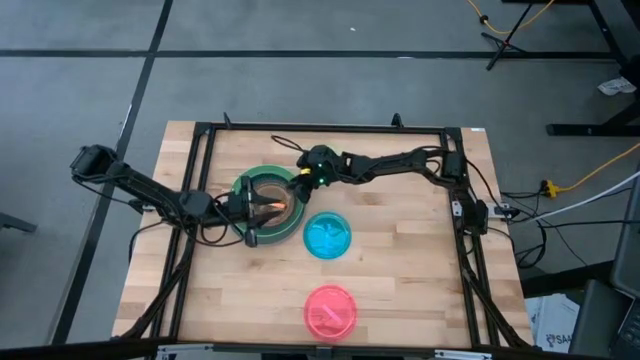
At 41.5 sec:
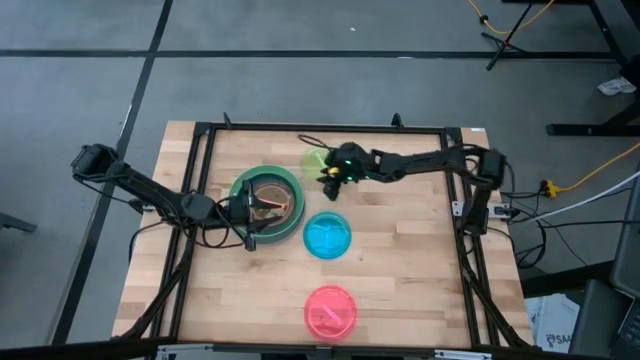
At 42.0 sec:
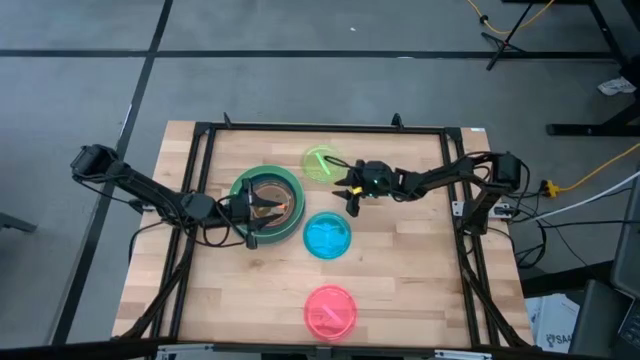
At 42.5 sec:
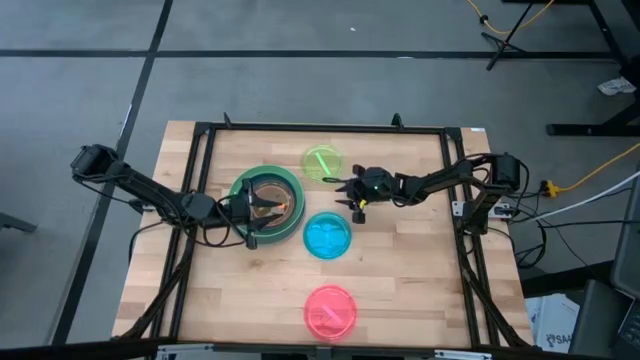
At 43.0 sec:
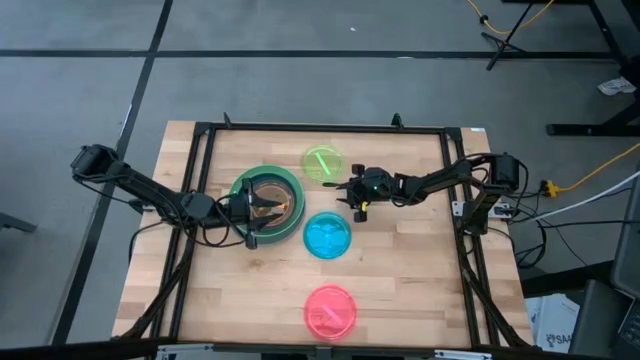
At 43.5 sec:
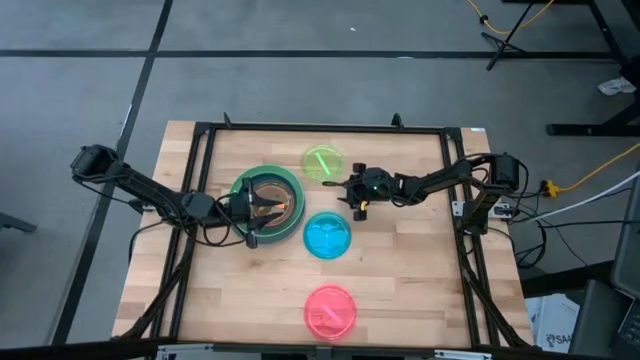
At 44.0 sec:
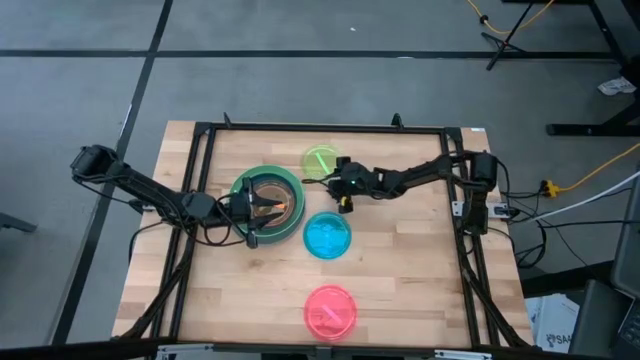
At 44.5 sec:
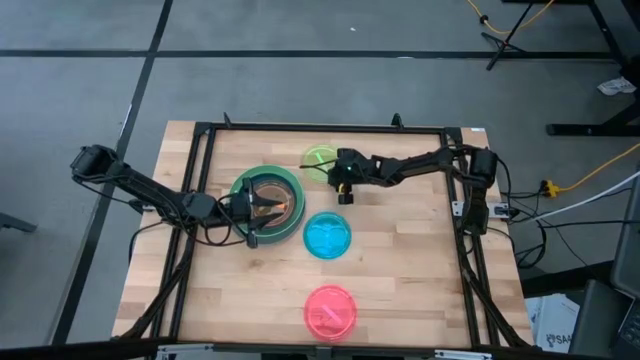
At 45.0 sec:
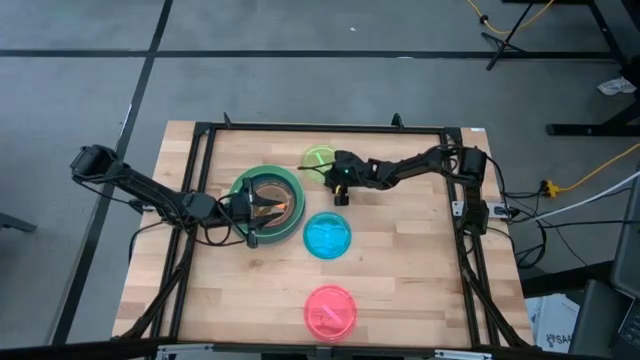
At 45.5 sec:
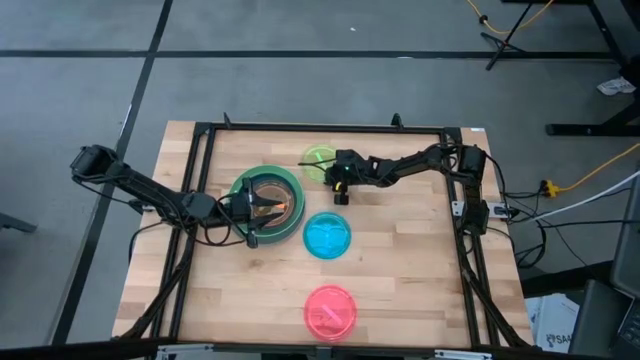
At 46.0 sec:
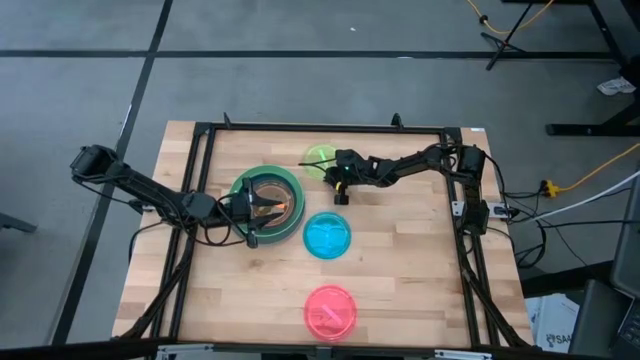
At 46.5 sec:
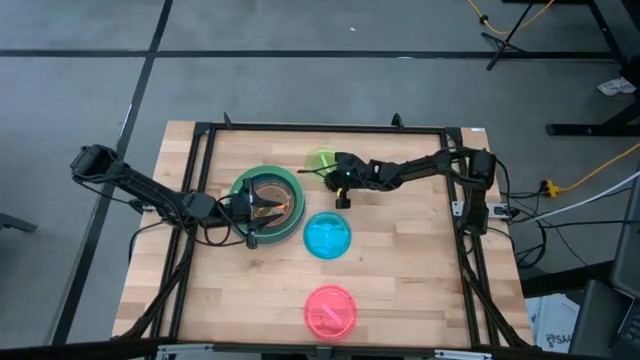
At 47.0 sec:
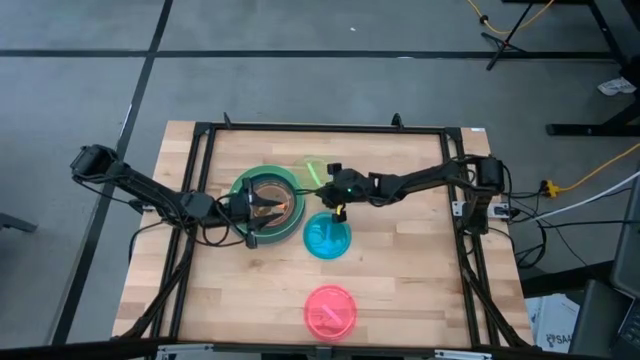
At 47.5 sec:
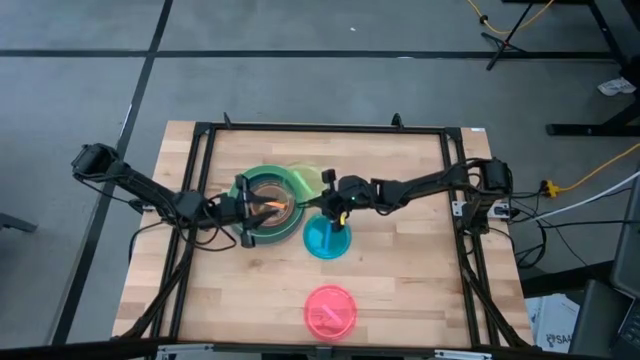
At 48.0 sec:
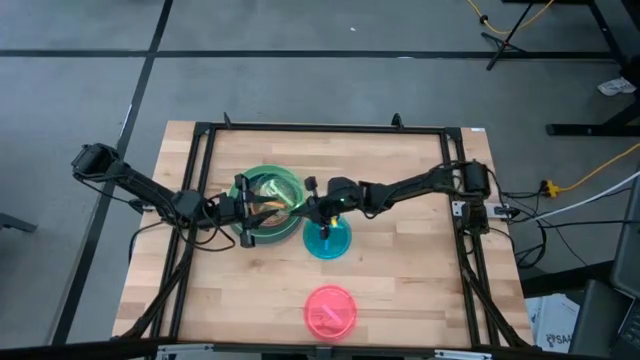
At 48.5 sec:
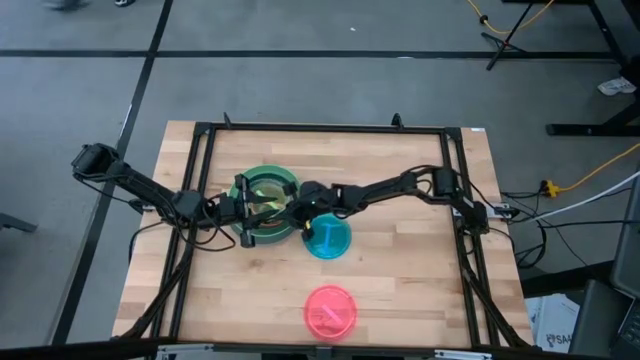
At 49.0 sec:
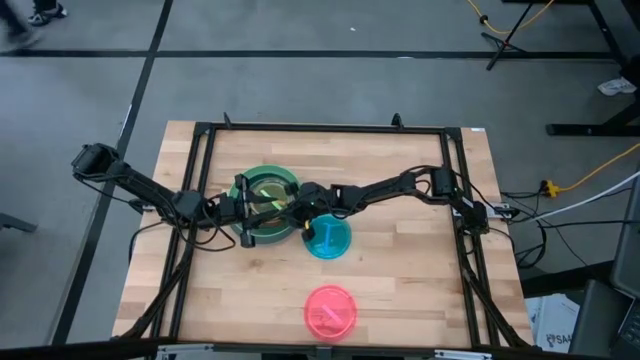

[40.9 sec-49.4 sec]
Task: Stack plastic plates
Stack the light green plate on top of orange plate

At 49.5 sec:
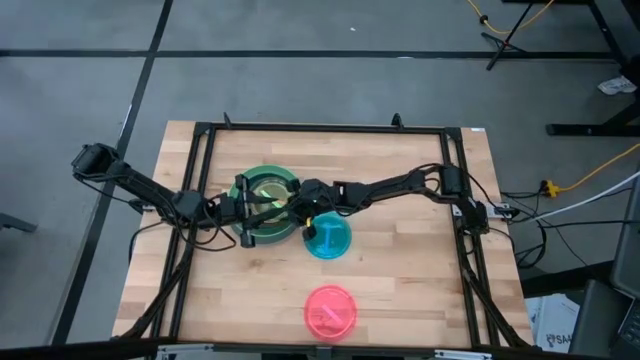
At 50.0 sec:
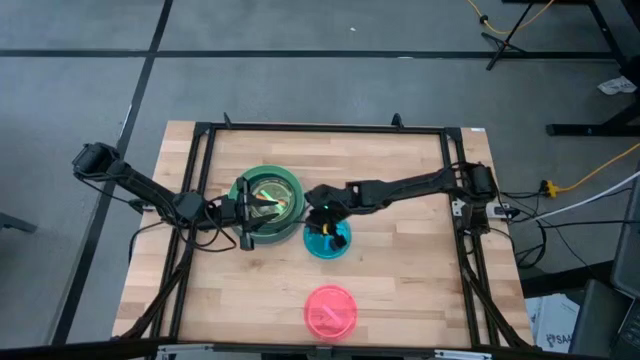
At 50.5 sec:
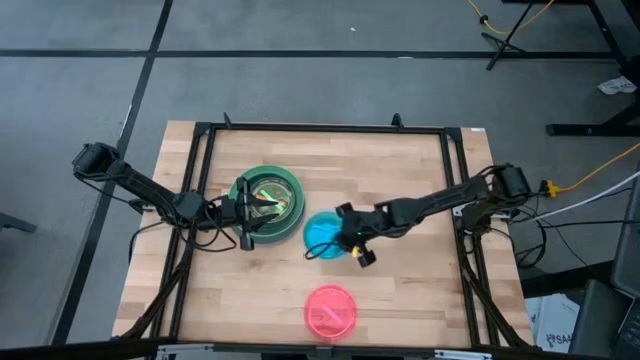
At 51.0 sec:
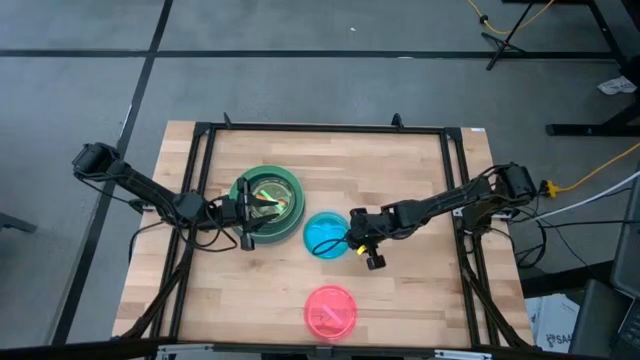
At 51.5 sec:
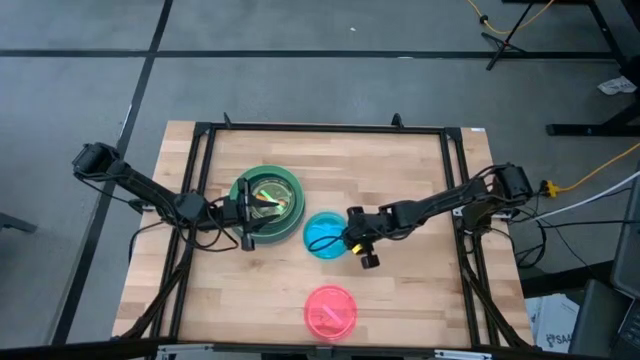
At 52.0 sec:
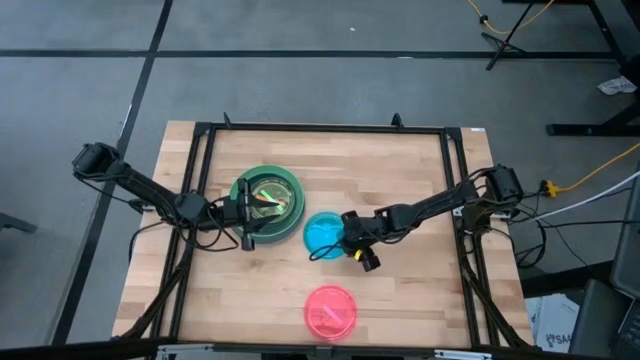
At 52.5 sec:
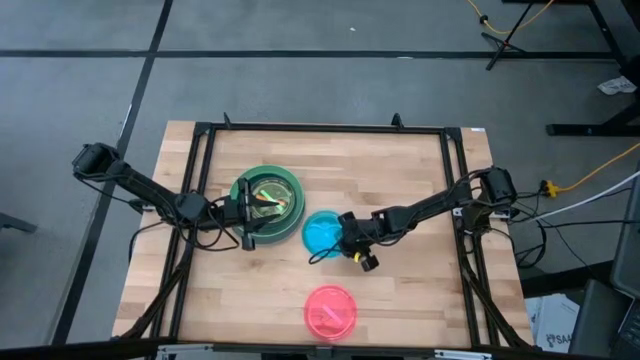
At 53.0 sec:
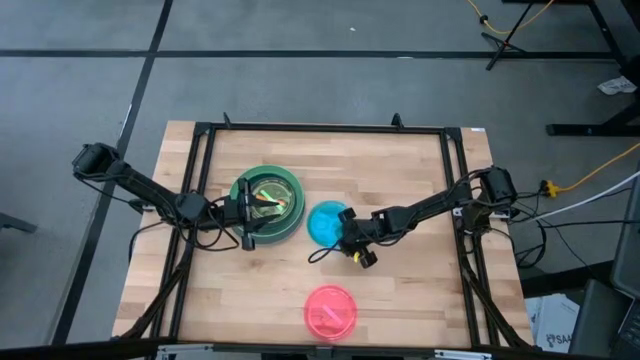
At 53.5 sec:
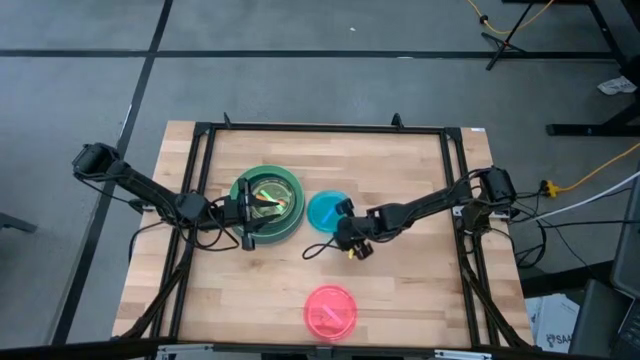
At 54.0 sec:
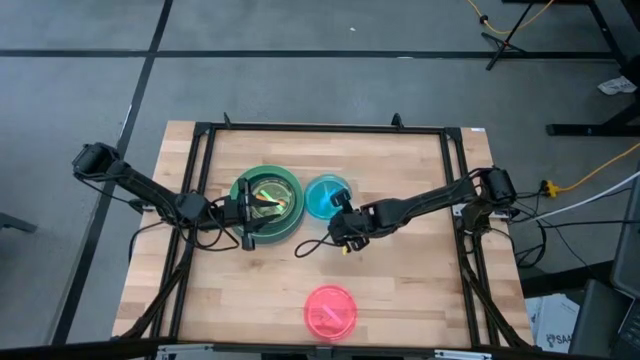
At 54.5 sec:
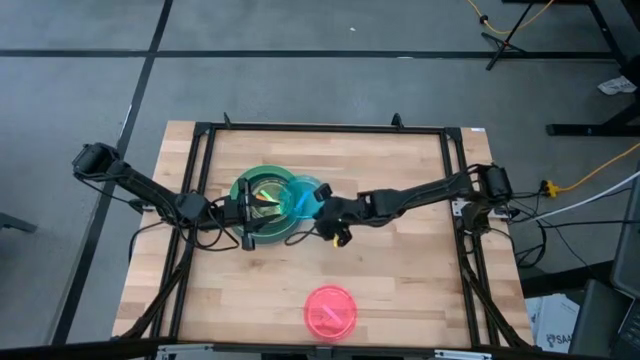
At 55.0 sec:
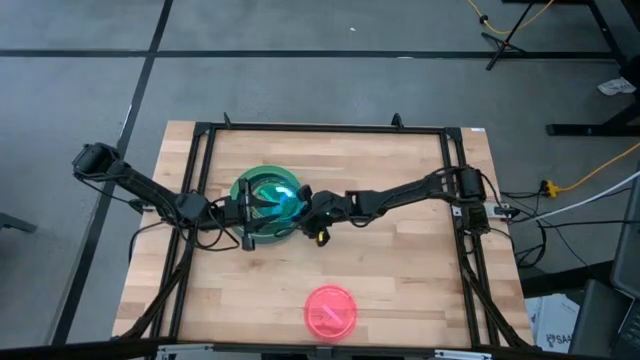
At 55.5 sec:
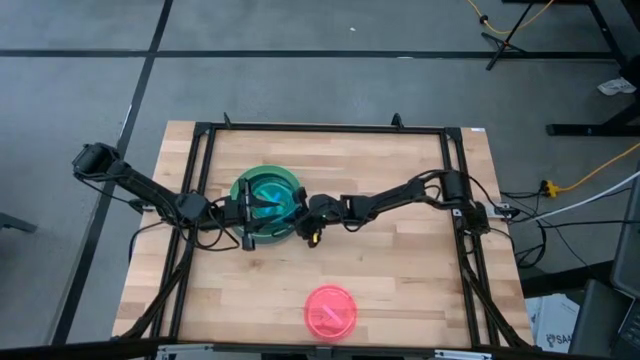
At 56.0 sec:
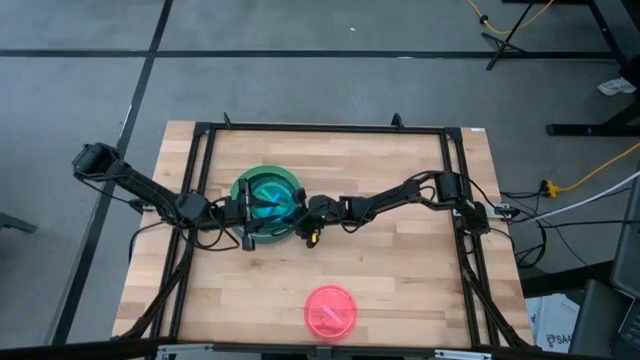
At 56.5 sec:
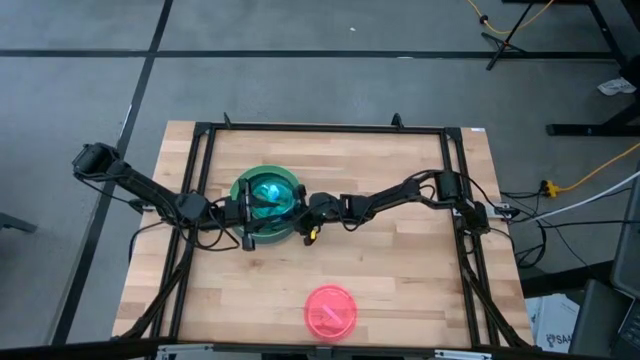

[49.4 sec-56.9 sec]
Stack the blue plate on top of light green plate

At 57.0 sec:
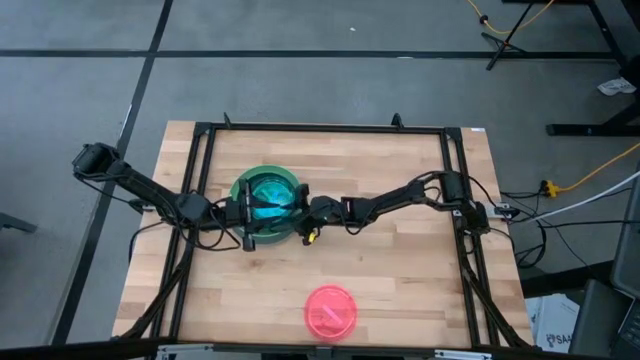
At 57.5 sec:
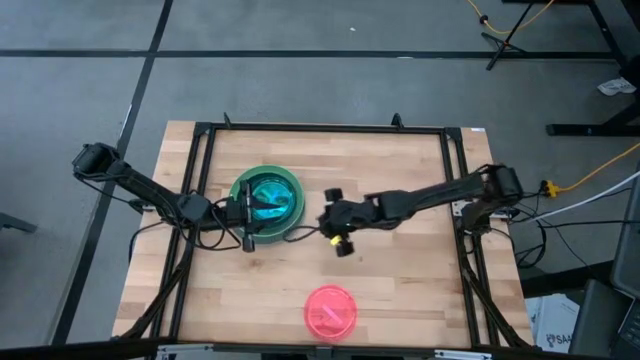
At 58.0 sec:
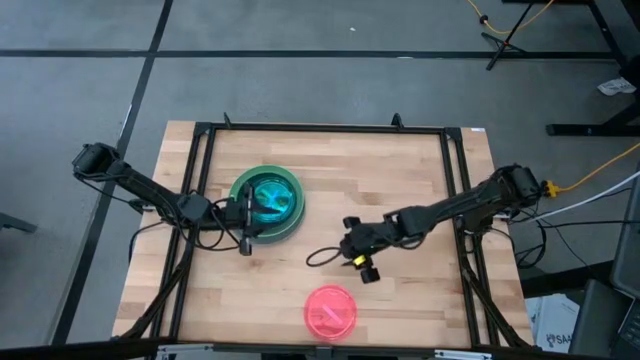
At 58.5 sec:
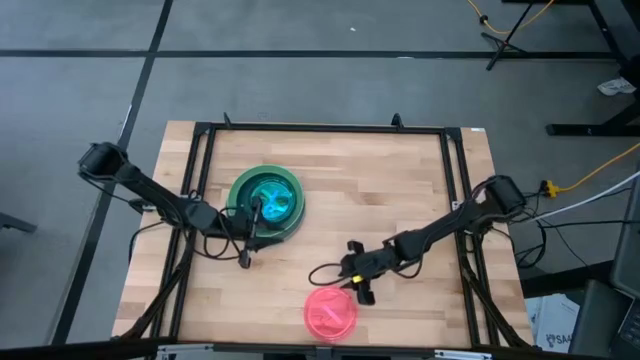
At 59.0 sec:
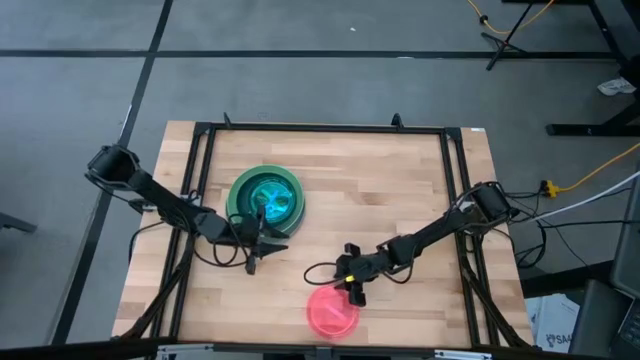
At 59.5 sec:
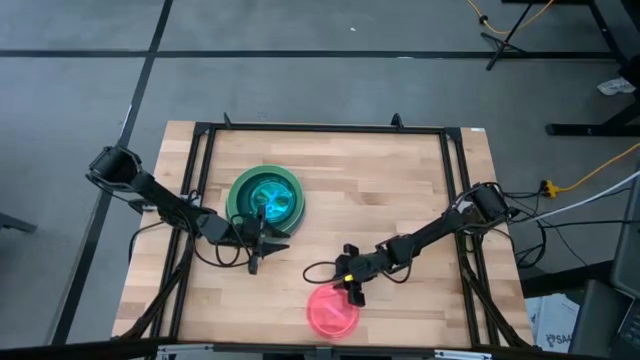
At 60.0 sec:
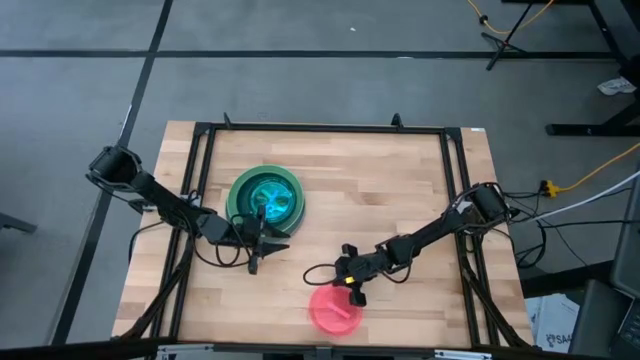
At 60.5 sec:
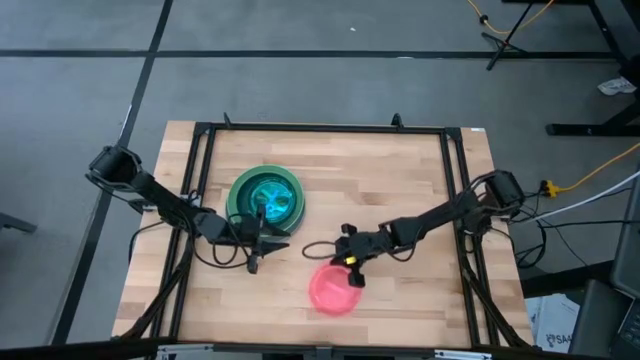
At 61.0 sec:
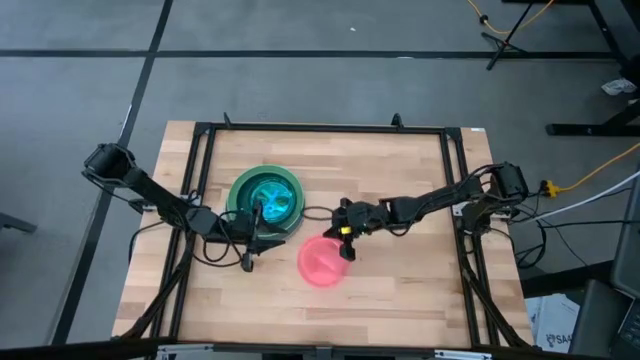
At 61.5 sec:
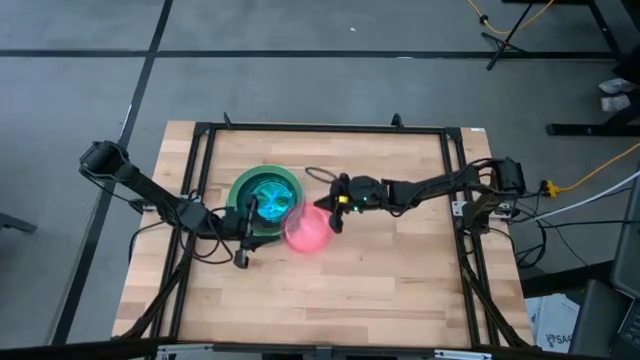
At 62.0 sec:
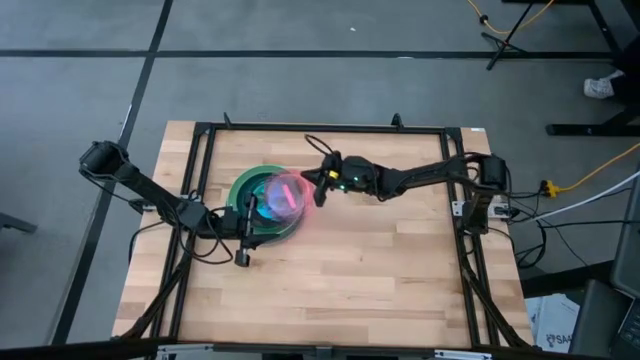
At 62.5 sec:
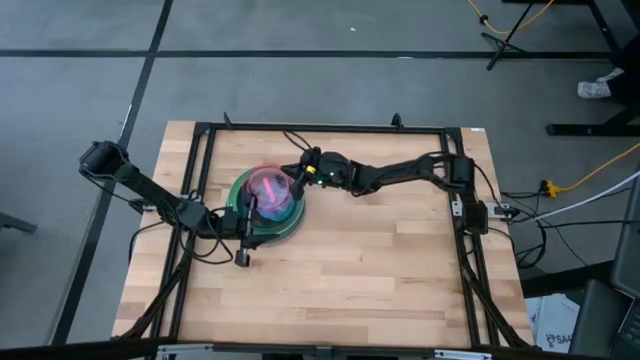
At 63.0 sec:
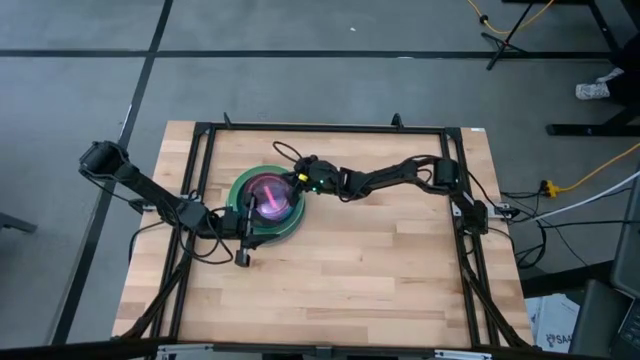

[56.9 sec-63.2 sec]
Stack the pink plate on top of blue plate
